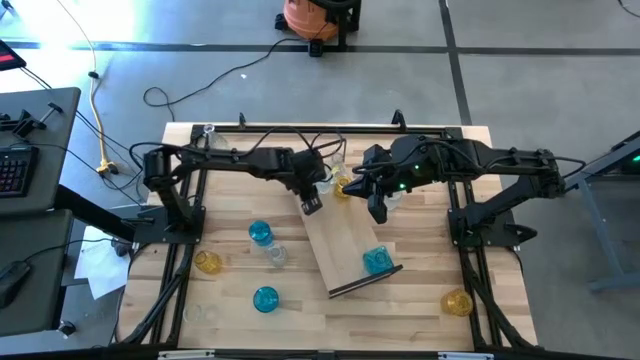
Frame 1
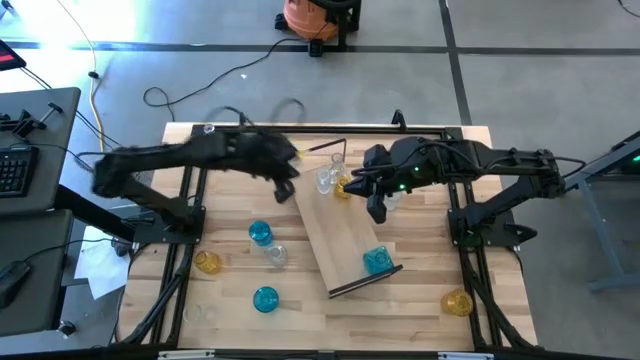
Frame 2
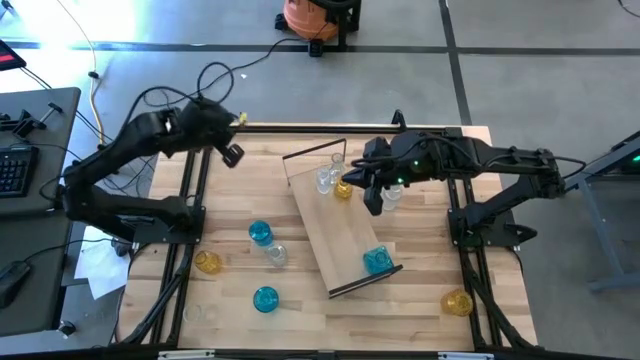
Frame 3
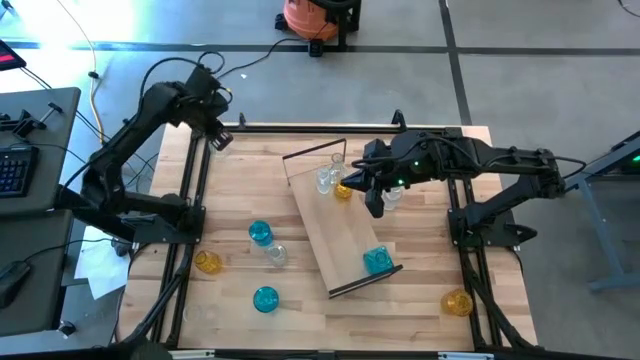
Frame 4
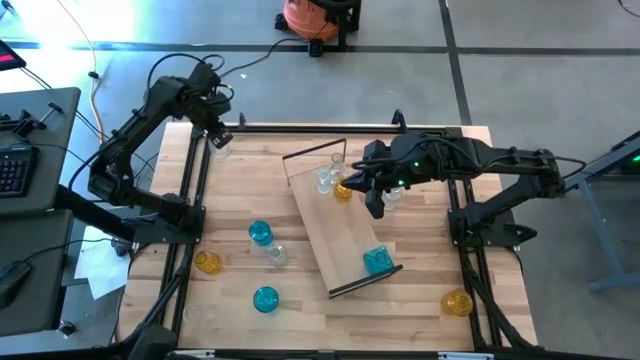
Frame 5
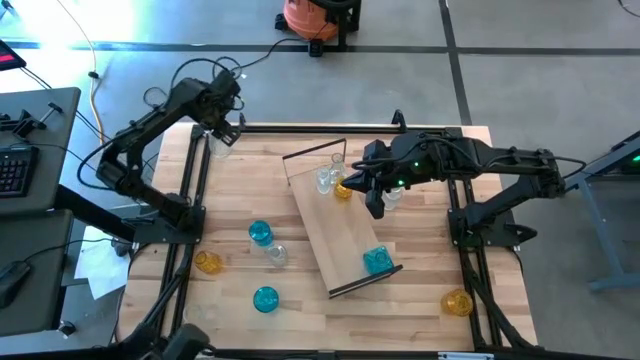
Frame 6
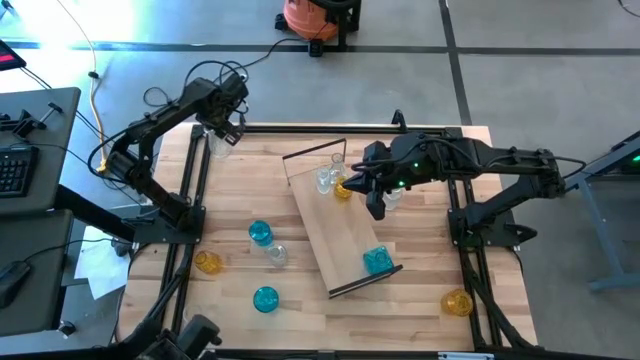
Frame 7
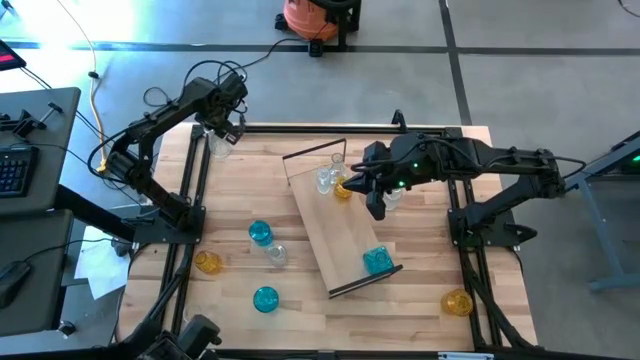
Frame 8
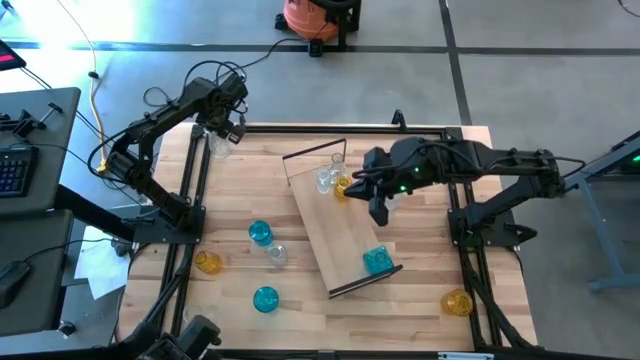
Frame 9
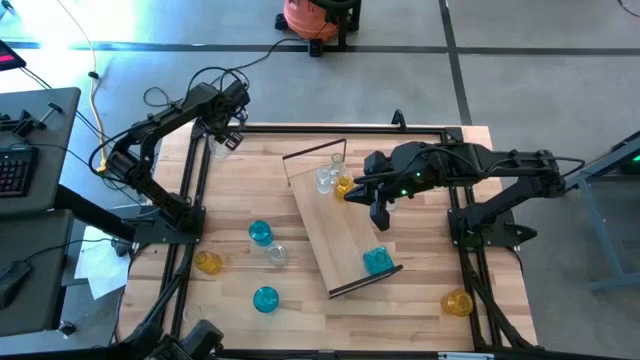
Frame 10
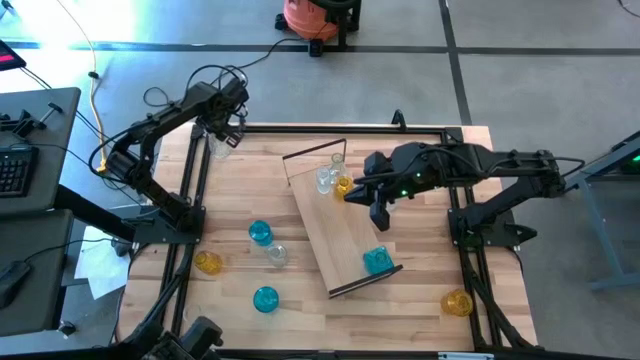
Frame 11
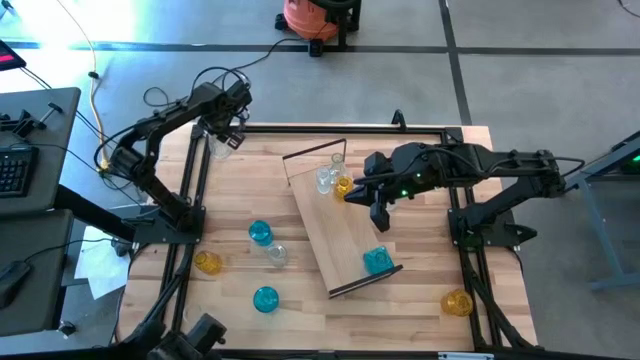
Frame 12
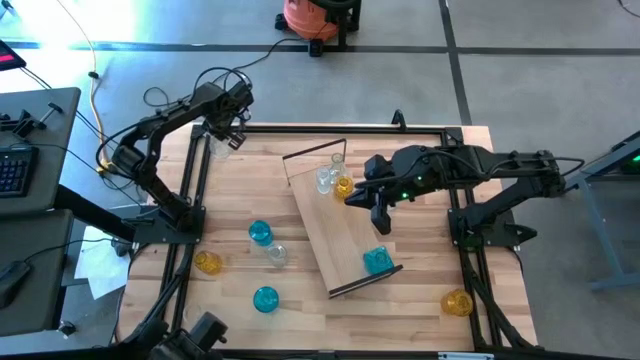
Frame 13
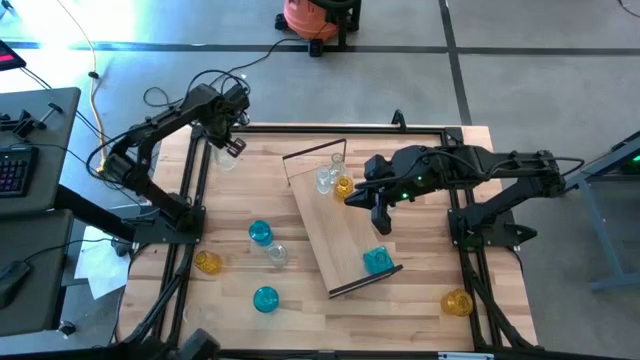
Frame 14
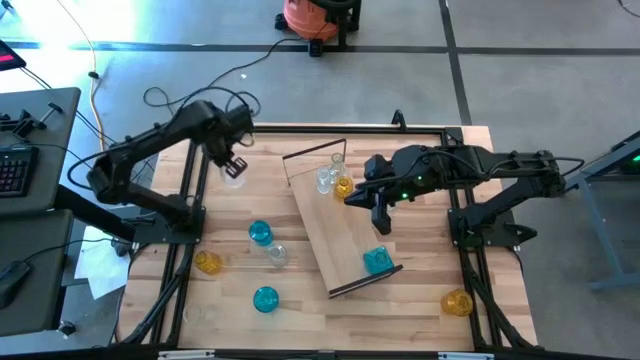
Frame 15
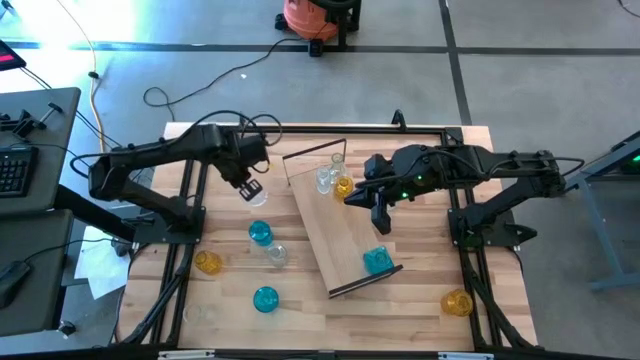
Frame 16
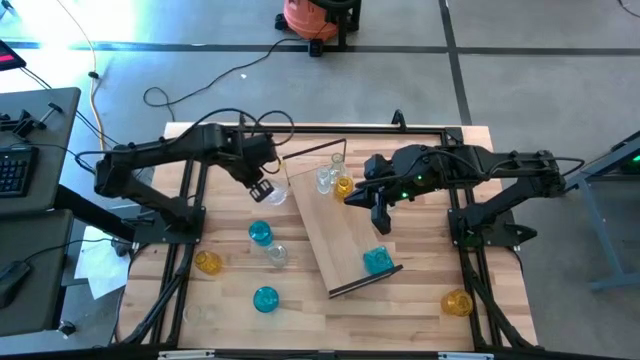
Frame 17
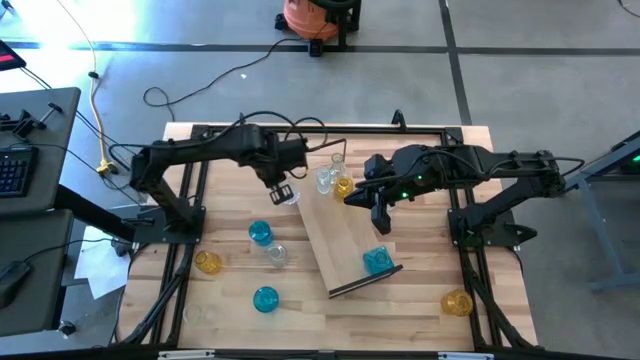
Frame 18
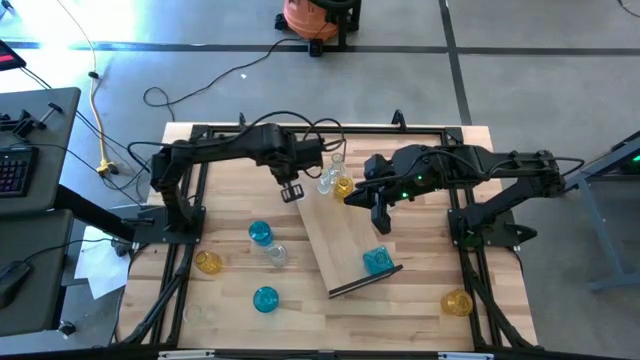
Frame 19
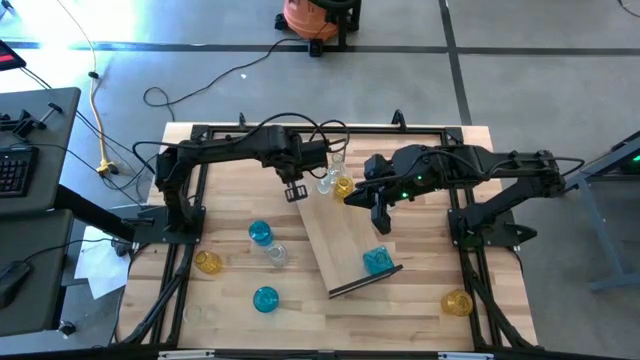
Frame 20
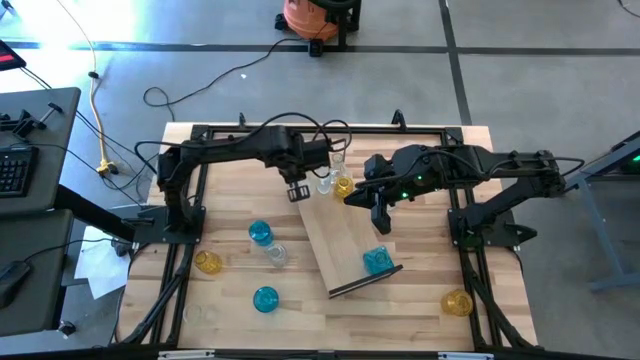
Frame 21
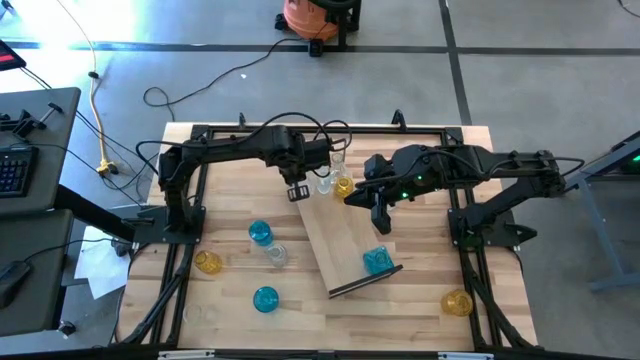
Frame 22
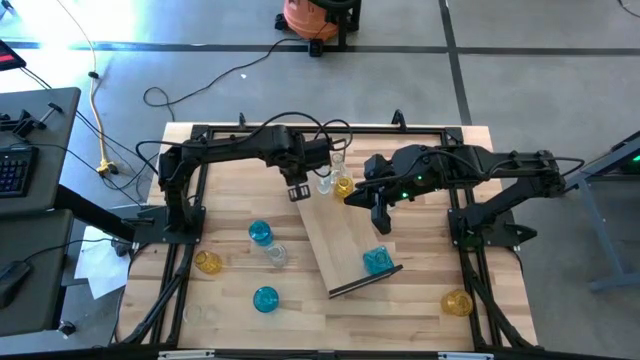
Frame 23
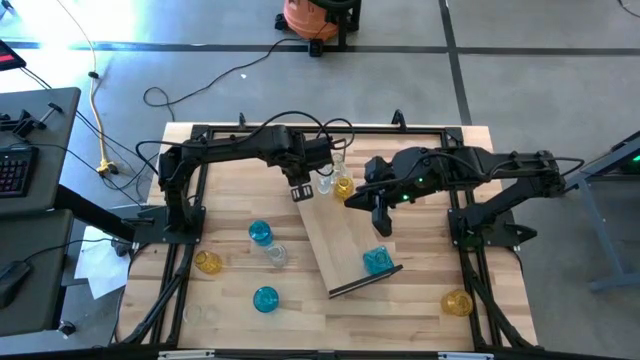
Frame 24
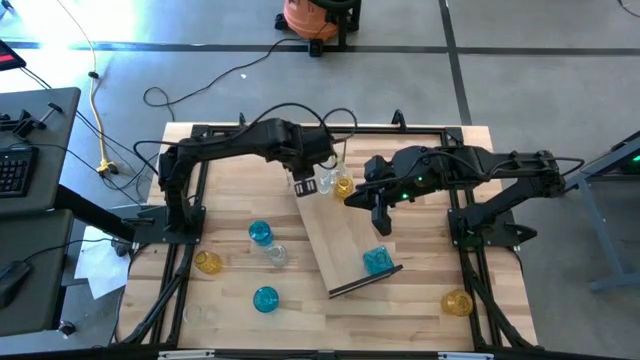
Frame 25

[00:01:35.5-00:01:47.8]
Task: sort vases onto shelf
Put the transparent crystal vase on the shelf aligned with the other transparent crystal vases

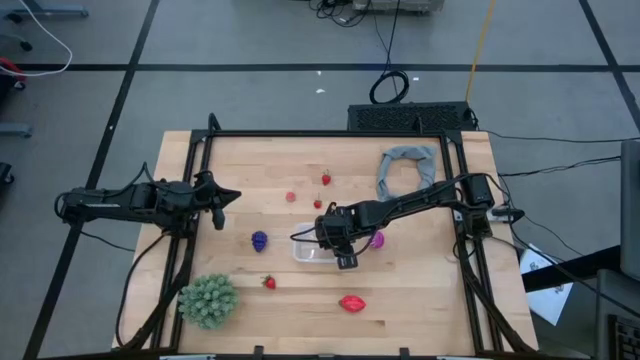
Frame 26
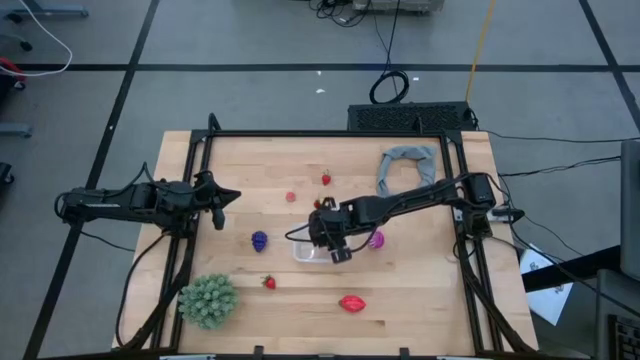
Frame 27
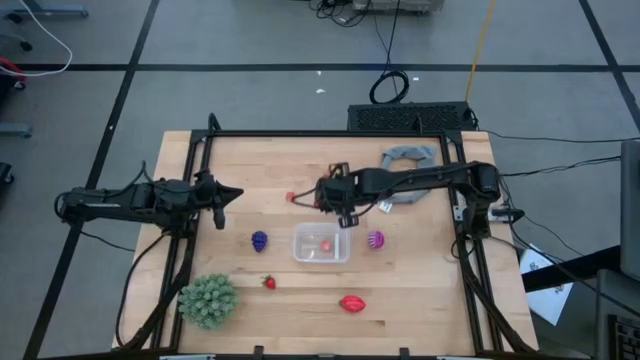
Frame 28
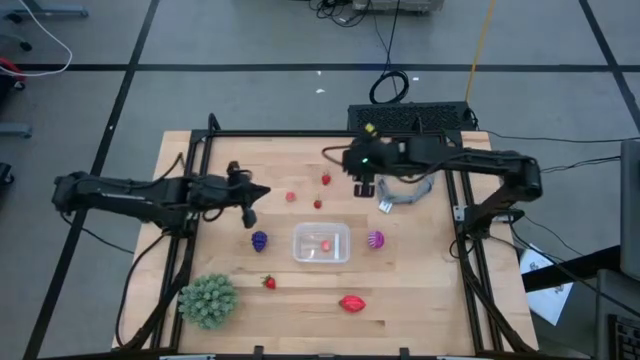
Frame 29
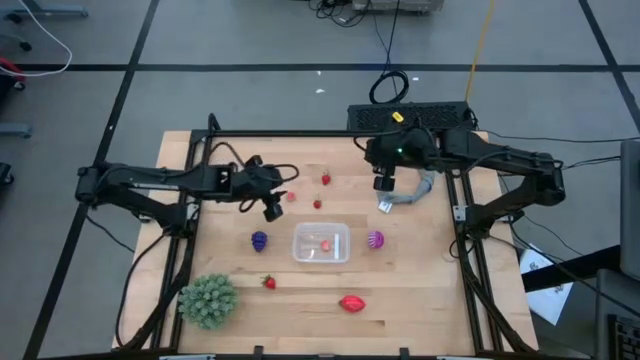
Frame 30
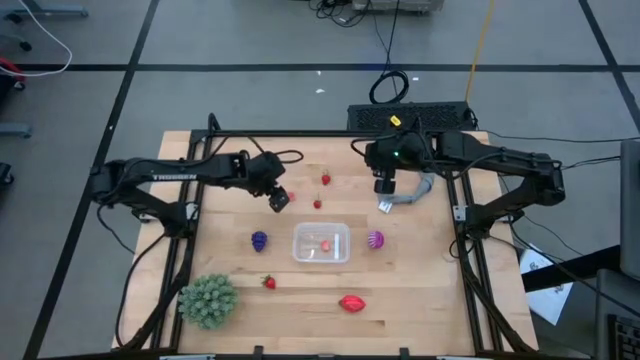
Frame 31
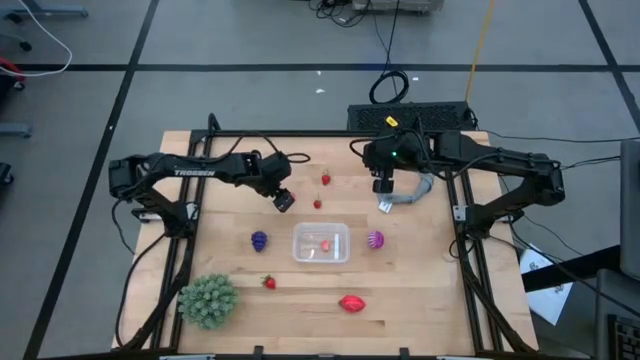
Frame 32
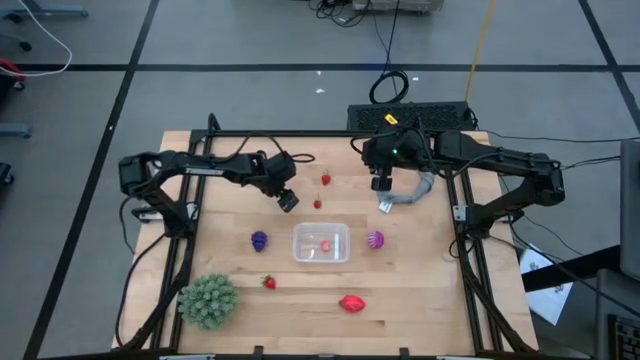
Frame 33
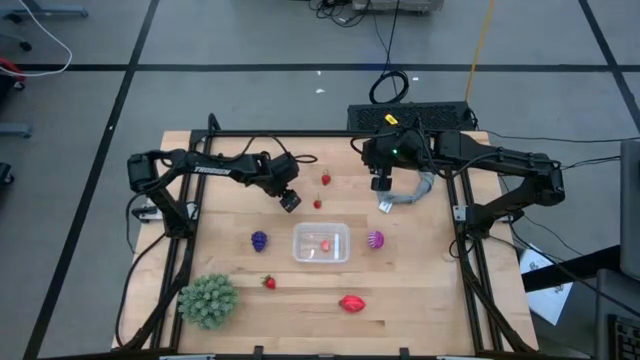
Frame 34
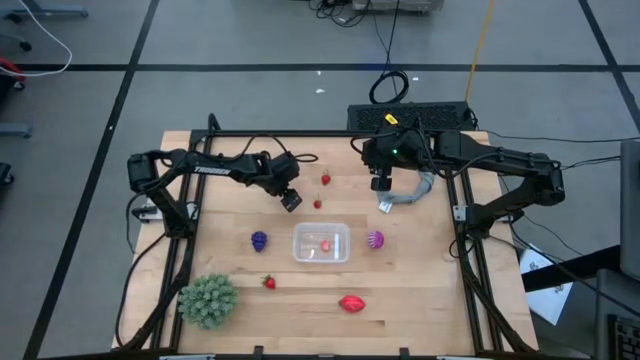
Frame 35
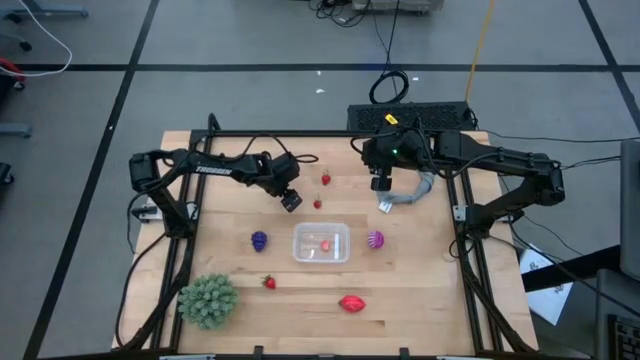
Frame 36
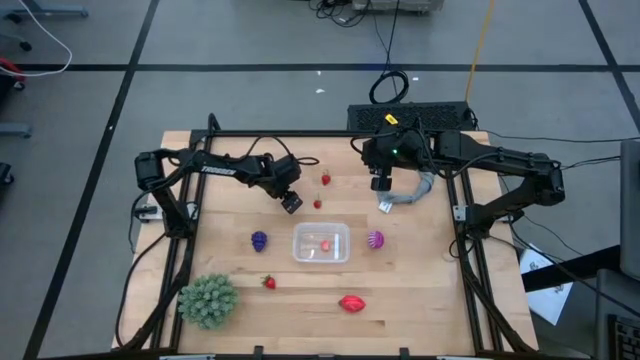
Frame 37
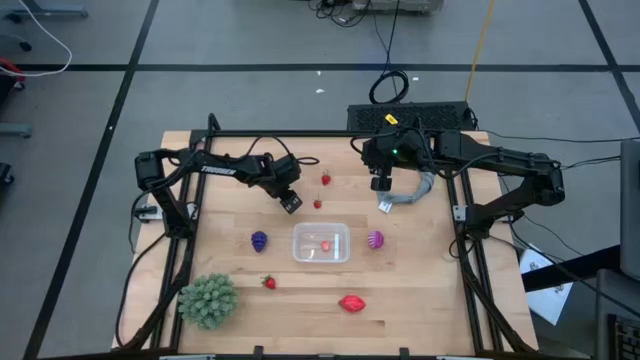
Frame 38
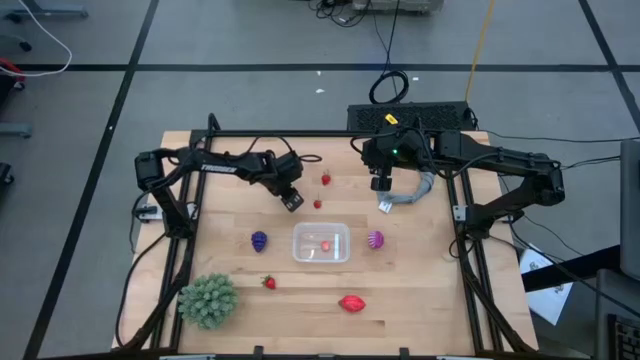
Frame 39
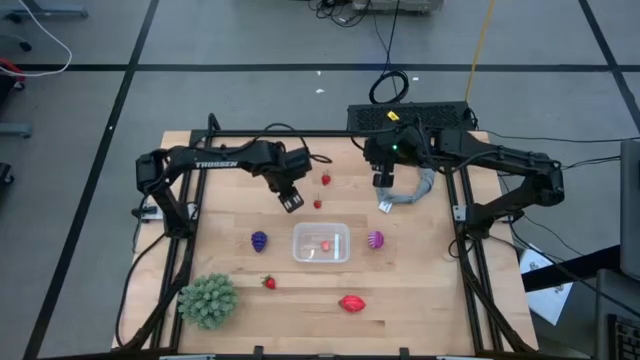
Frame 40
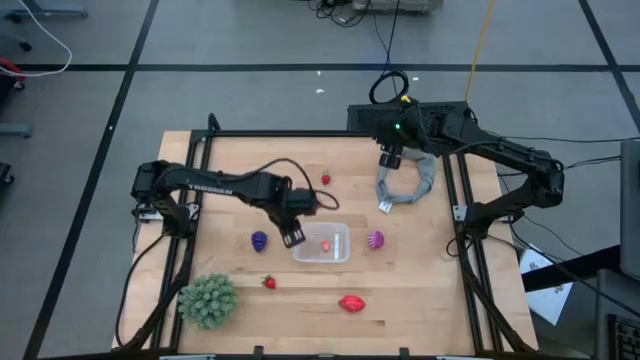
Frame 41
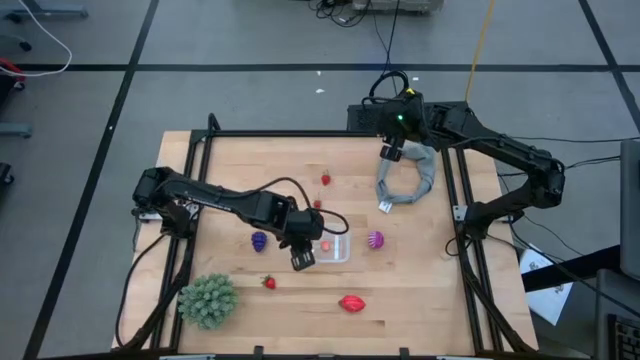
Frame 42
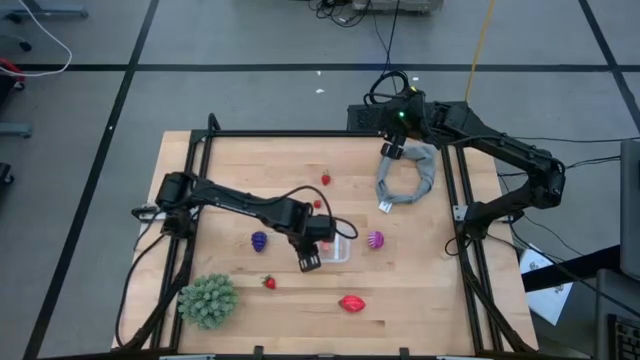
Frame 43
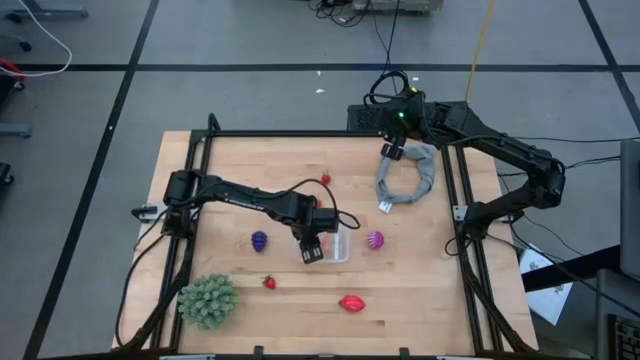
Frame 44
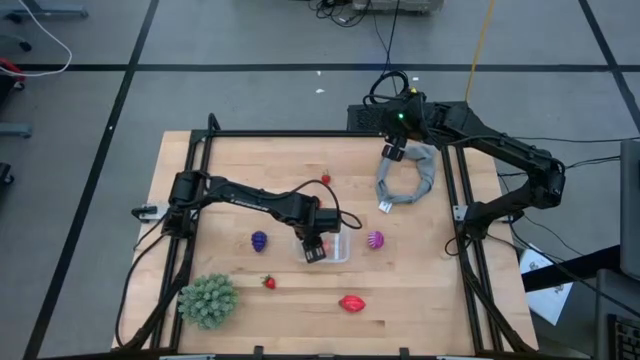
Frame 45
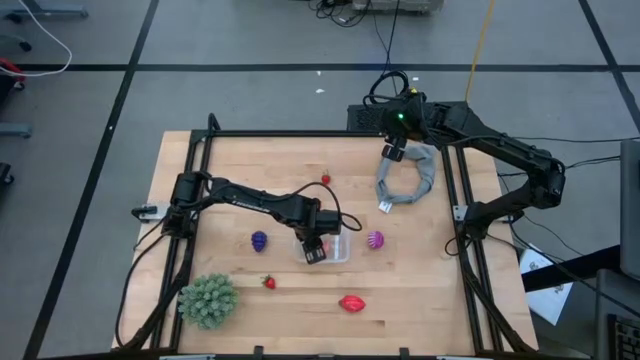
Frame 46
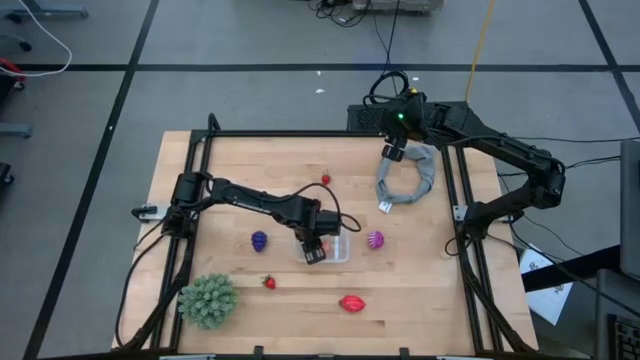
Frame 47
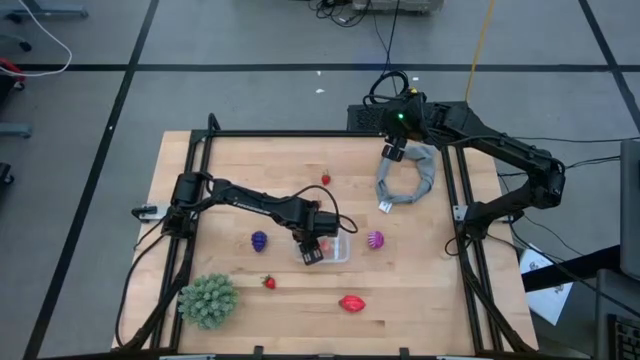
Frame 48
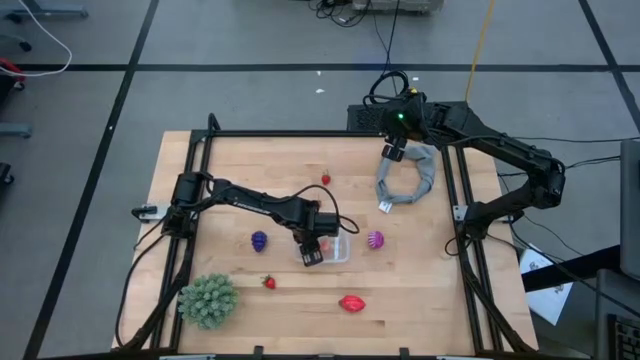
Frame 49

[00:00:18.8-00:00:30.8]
Task: Pick and placing Produce into tupperware
Put the peach into the bin
